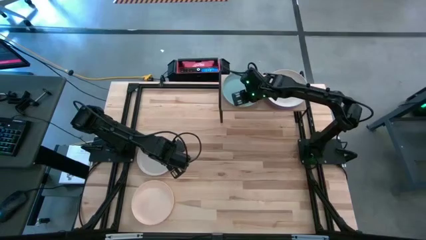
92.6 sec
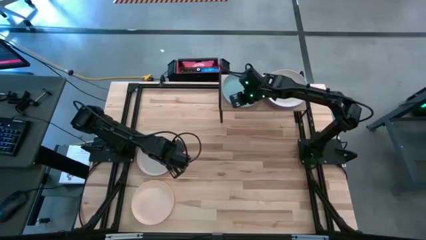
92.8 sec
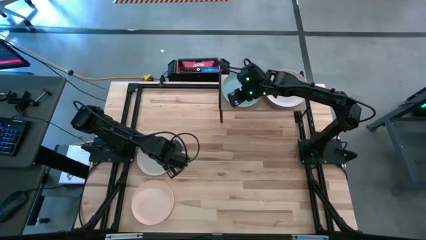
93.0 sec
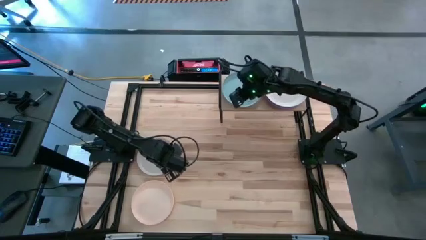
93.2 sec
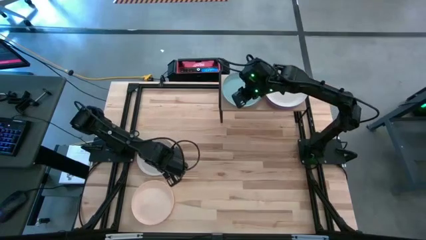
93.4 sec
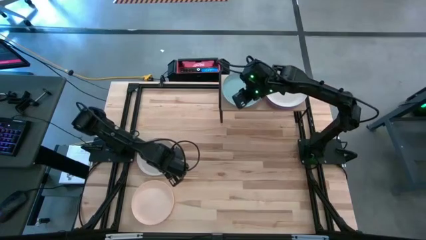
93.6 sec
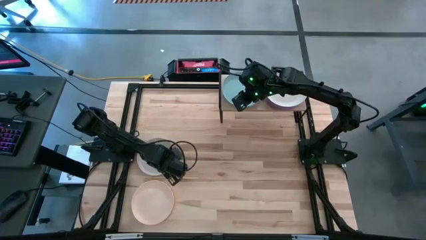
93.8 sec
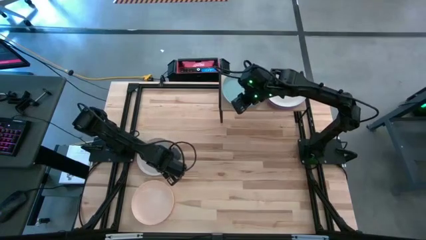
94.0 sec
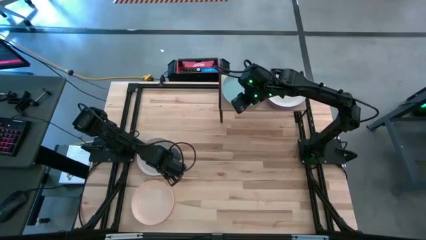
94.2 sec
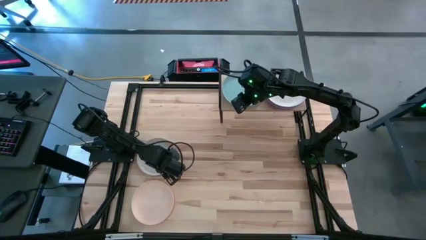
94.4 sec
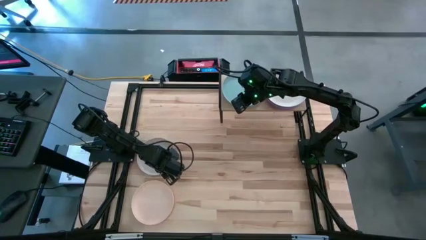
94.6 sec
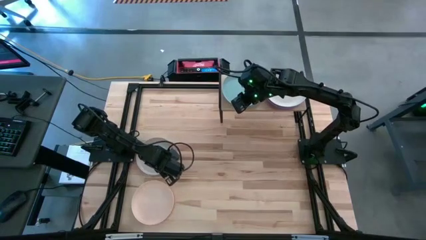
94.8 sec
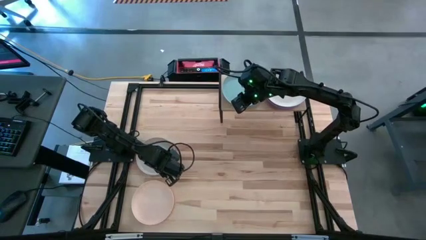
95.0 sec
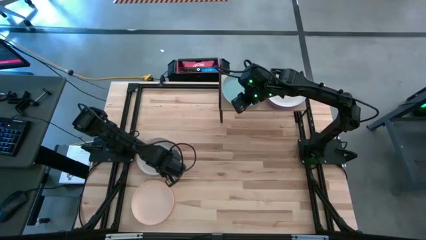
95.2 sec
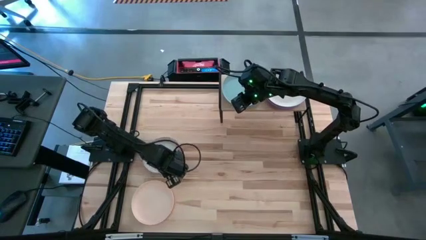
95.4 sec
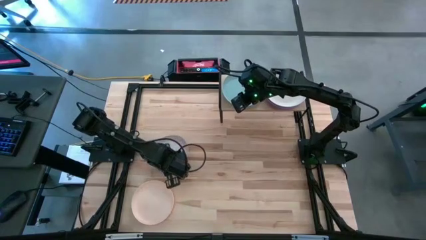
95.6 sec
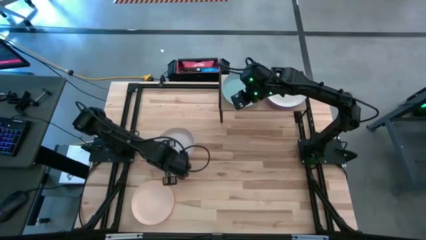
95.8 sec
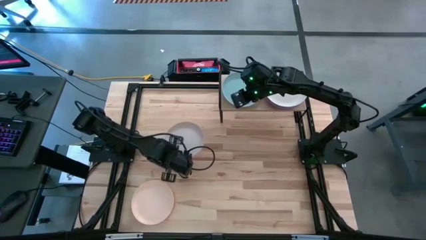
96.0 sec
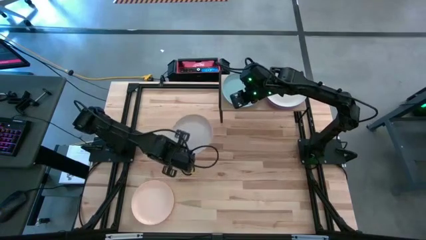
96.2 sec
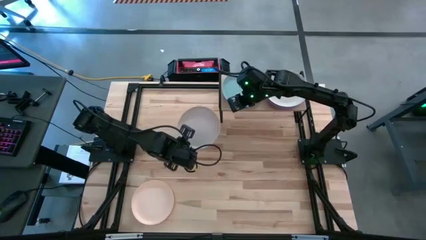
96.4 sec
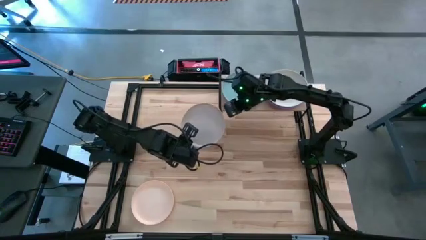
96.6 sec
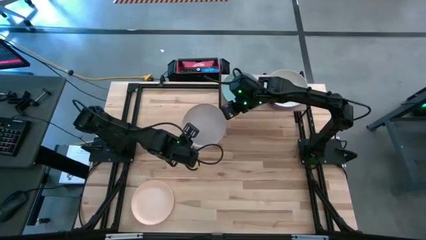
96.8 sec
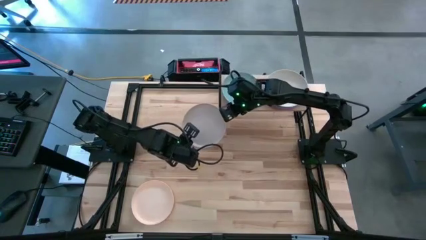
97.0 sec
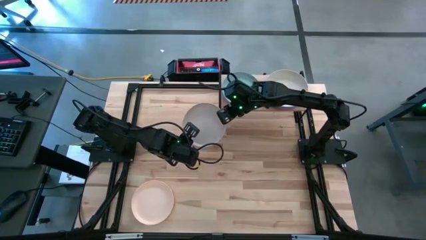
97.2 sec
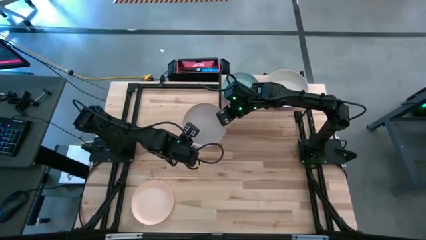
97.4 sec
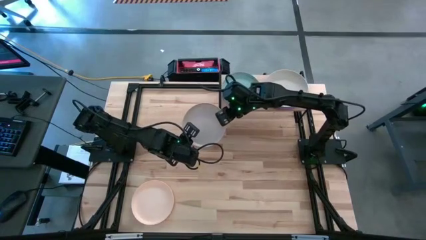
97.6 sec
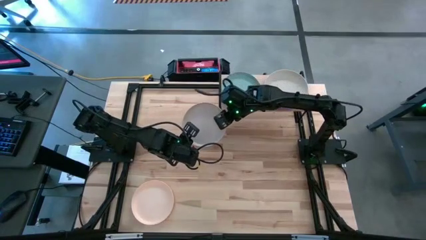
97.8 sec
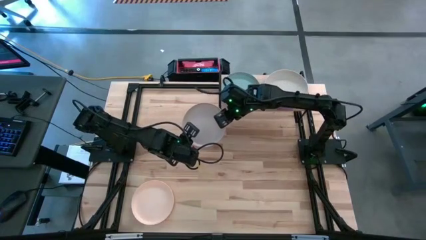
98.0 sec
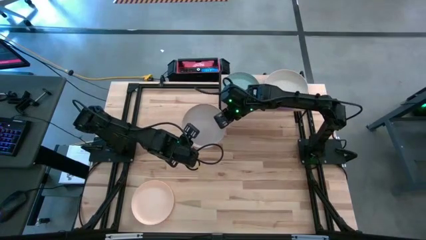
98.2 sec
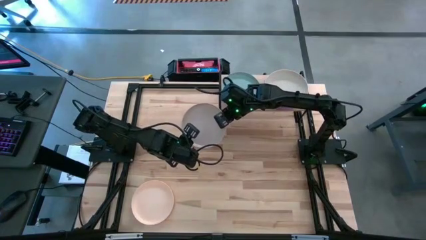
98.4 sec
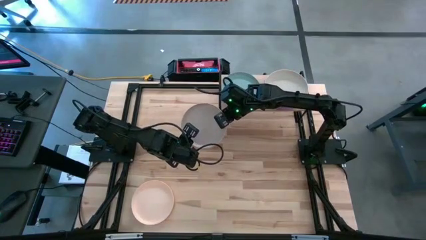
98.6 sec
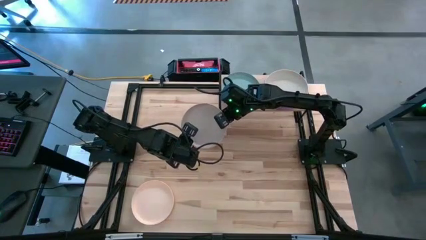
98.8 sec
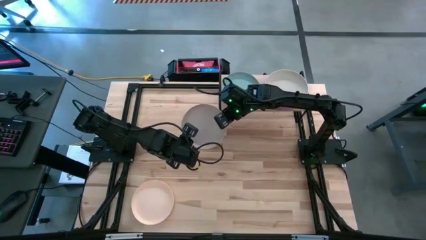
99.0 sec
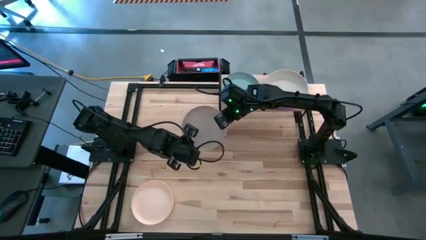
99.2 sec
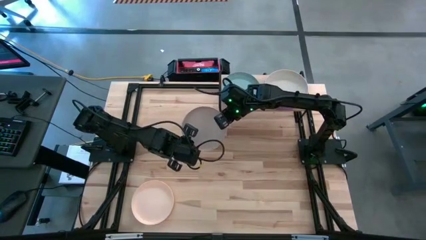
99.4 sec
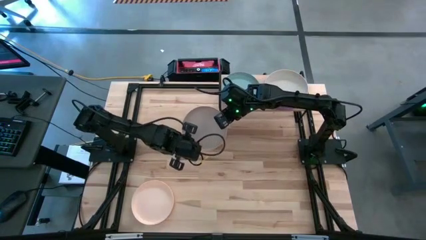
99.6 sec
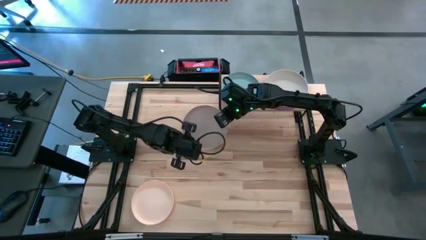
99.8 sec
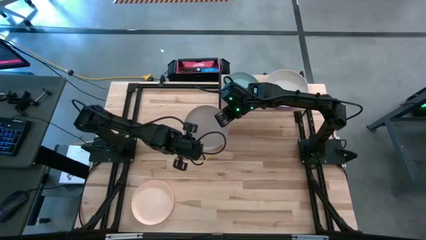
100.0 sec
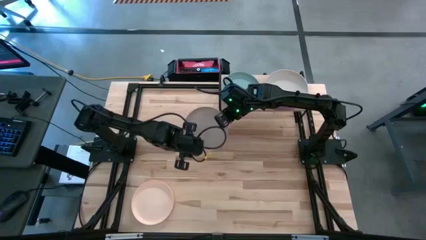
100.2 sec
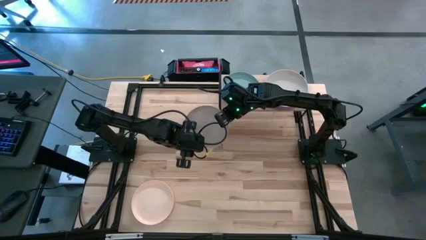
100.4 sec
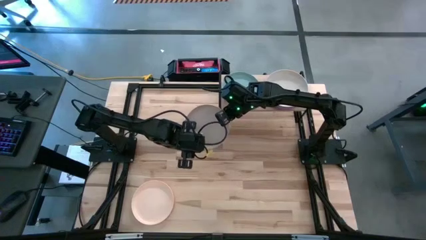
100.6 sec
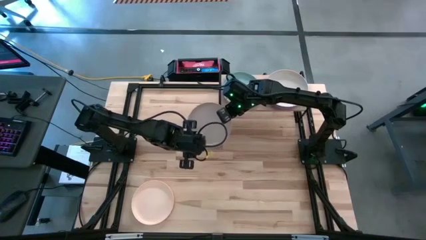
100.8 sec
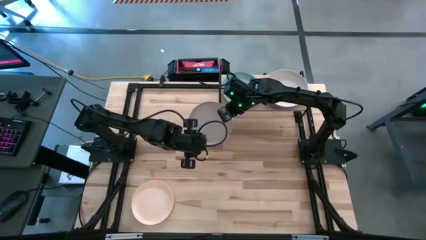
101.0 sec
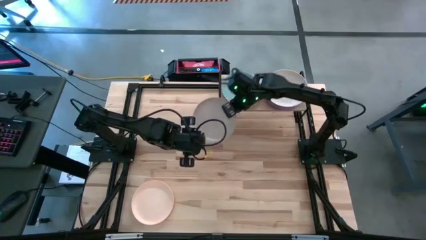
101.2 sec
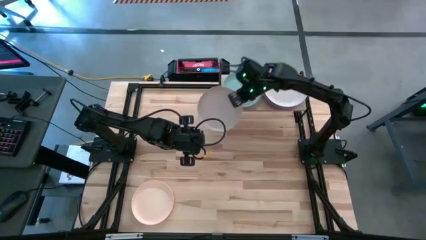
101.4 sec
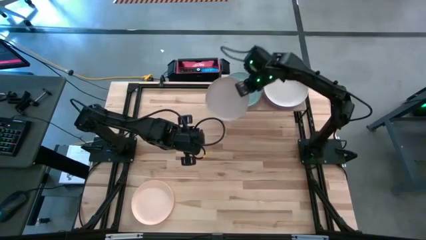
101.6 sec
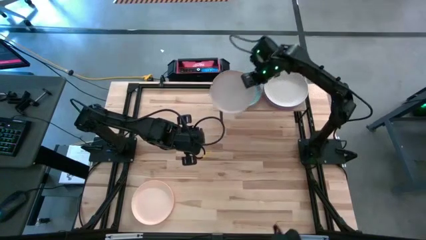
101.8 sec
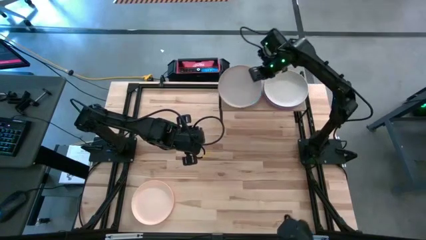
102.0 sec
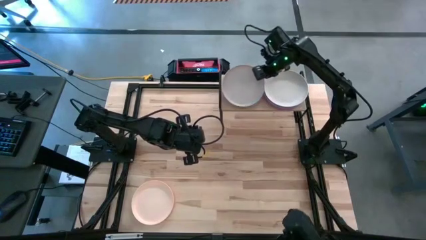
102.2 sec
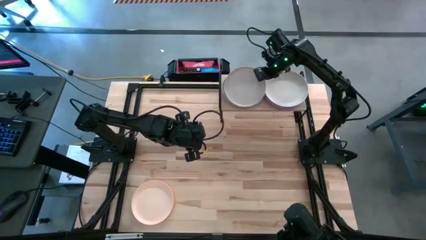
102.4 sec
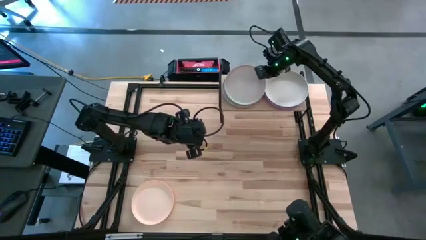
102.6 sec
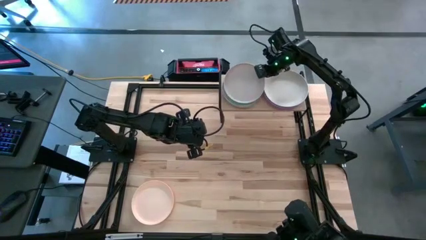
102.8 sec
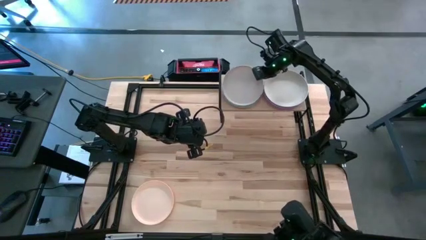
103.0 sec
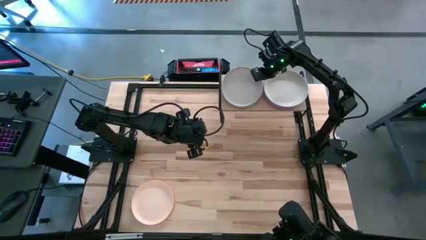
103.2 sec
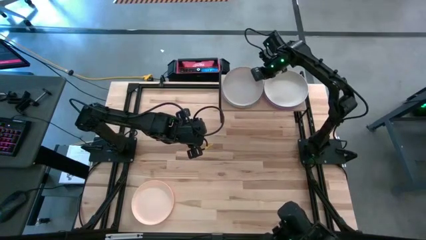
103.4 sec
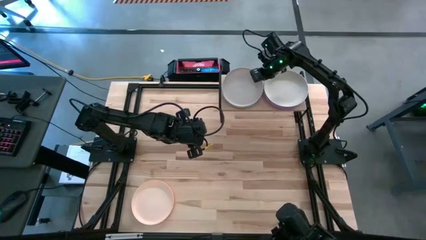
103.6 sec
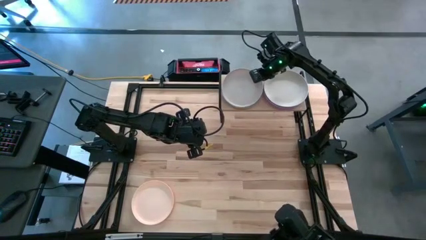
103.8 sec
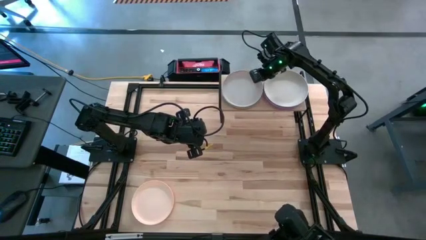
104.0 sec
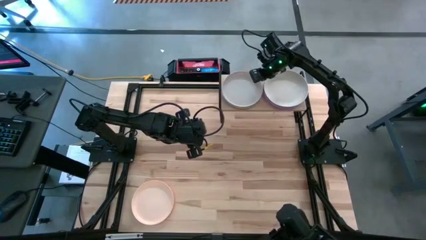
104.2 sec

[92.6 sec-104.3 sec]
Task: Place and stack plates onto a shelf
Stack the gray plate on top of the light blue plate on the shelf

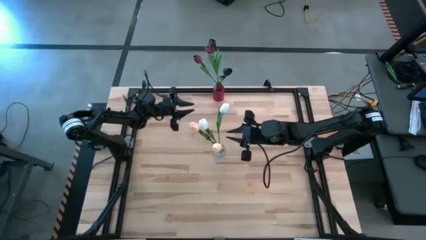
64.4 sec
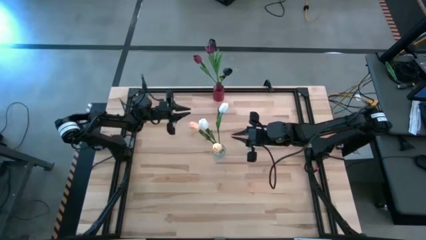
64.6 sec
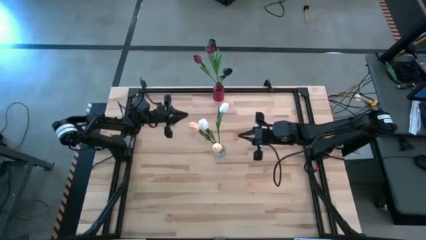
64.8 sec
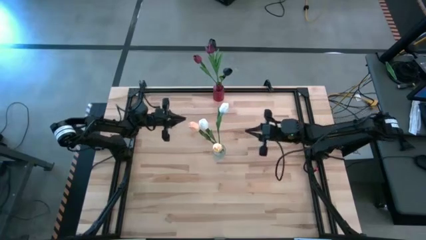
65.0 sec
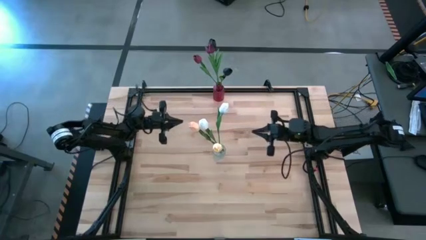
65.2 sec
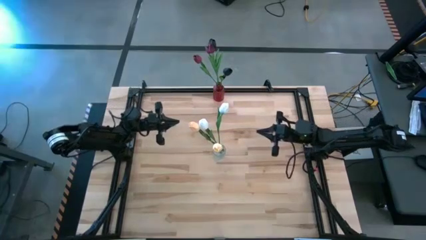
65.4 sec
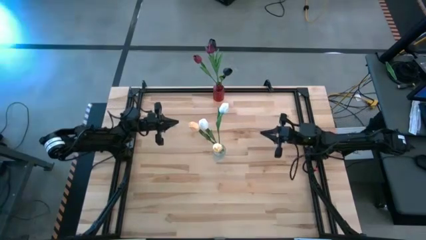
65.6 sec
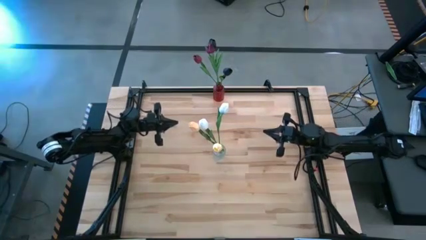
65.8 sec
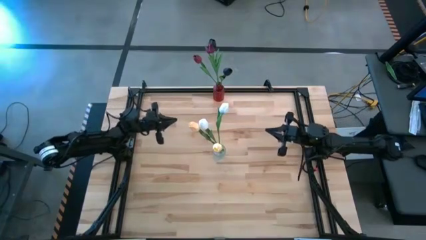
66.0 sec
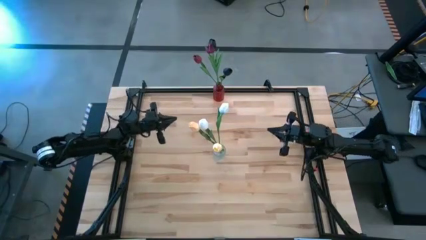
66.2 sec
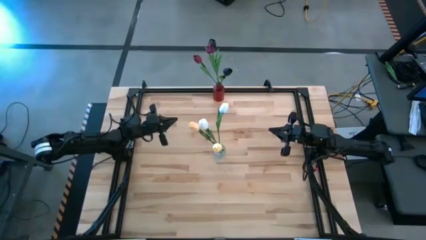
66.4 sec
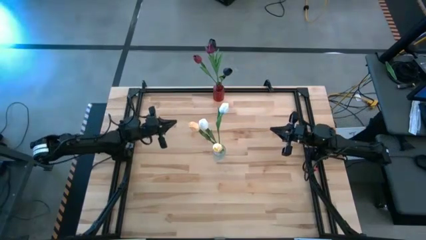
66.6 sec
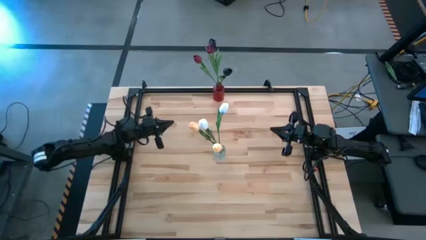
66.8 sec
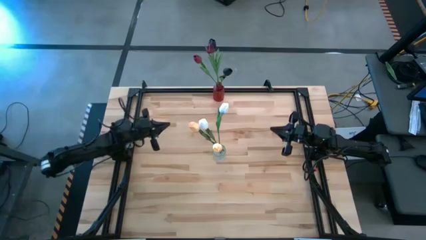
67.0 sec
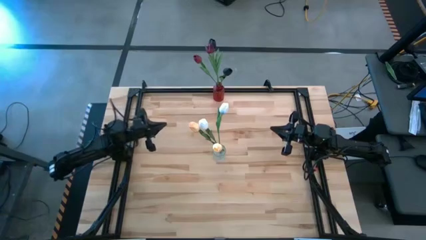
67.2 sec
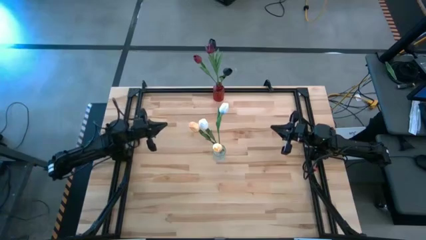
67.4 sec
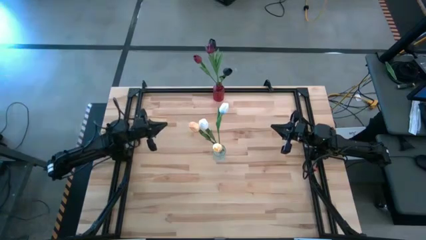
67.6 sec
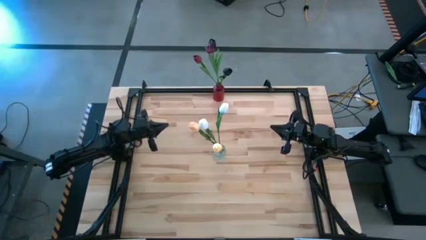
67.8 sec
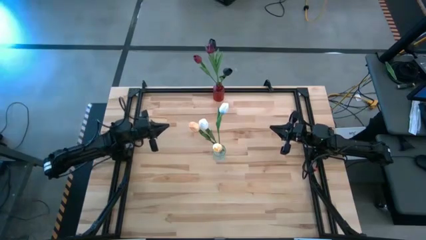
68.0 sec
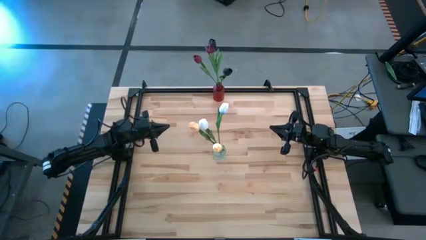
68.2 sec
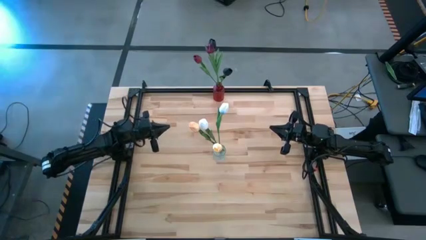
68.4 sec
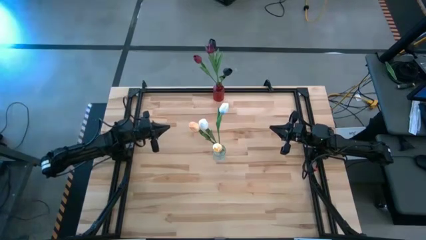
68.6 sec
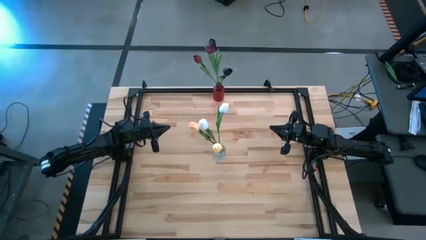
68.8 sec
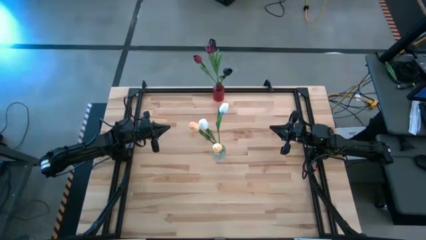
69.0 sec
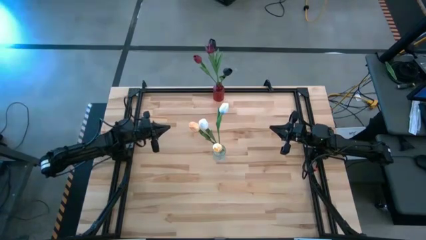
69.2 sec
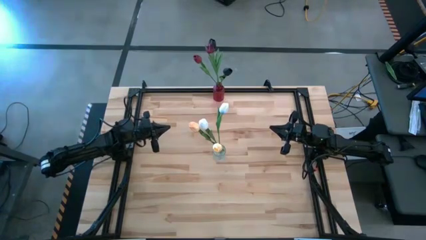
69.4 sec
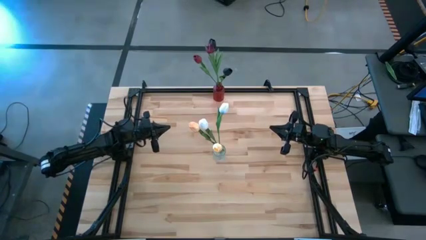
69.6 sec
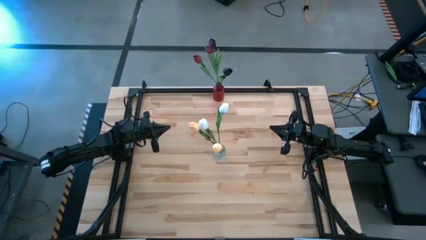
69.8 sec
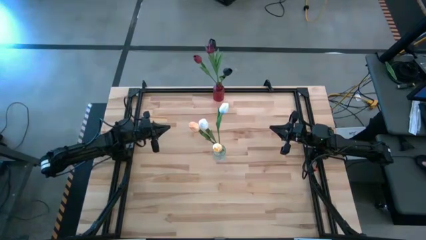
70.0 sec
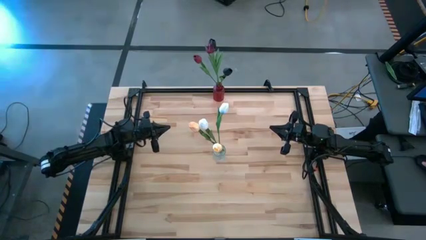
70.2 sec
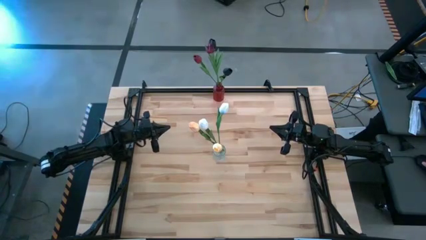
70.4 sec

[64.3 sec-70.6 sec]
Task: Sort flowers into vase by color
Return to Home Position
